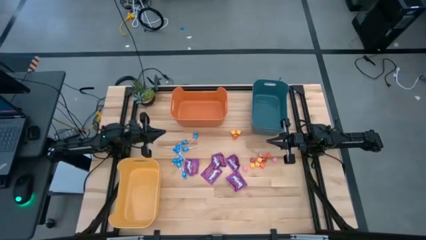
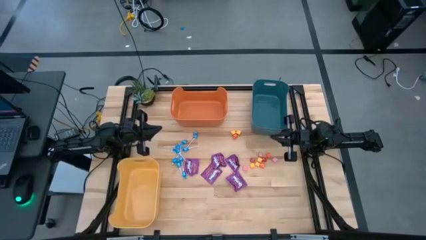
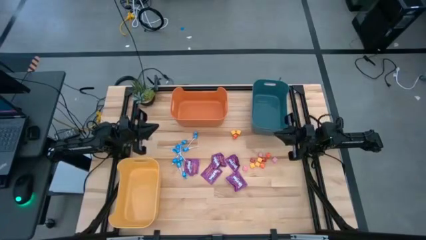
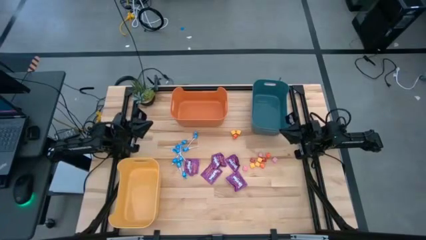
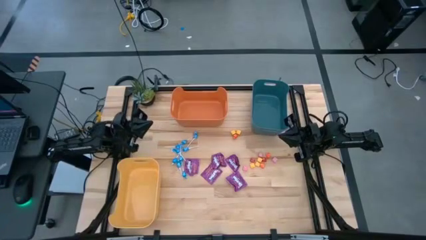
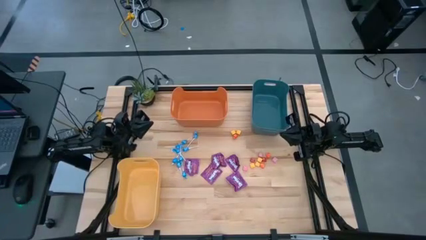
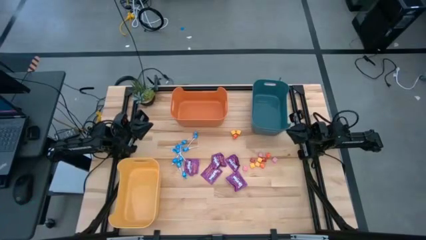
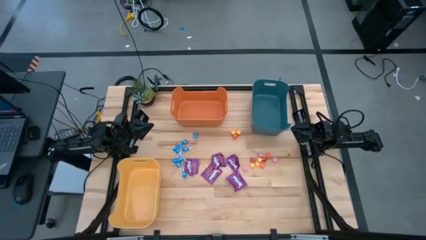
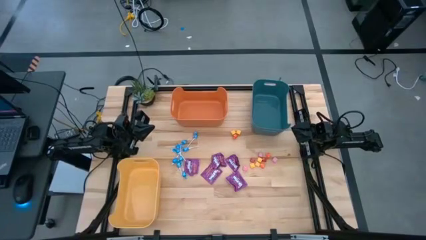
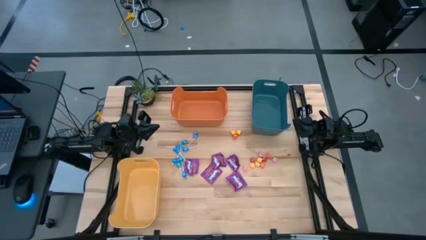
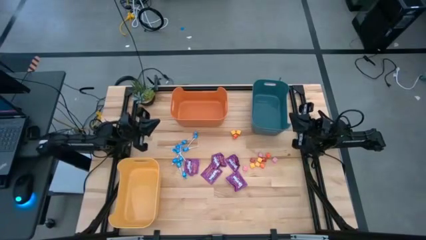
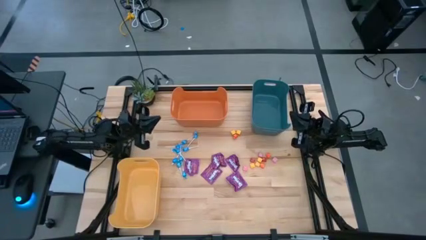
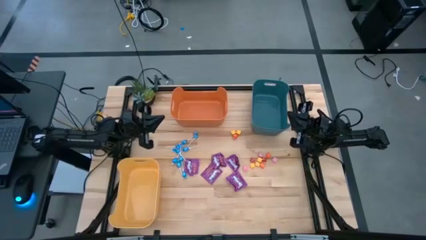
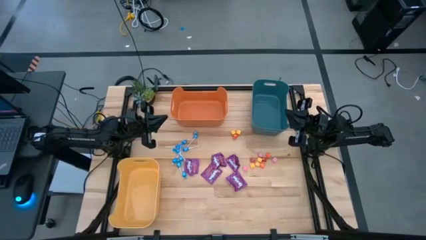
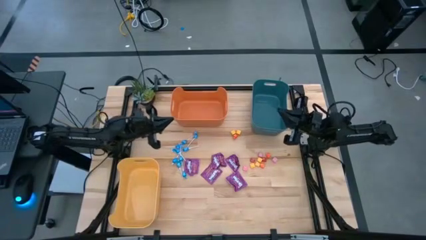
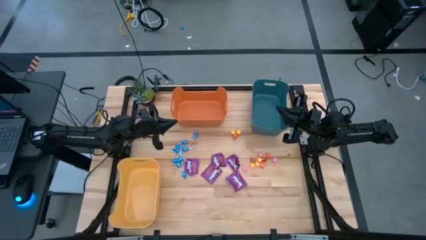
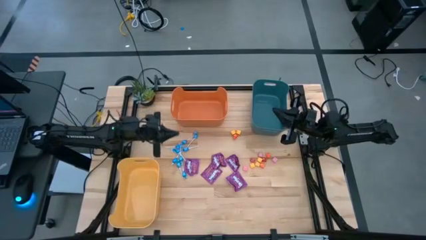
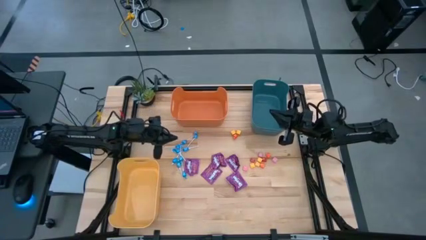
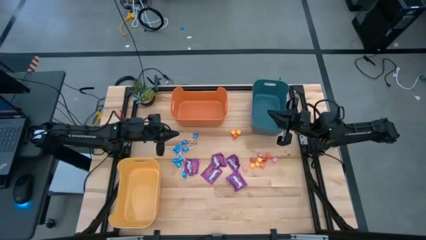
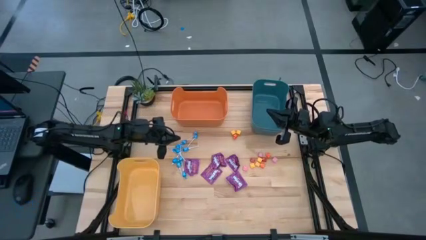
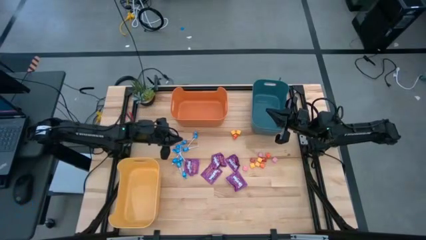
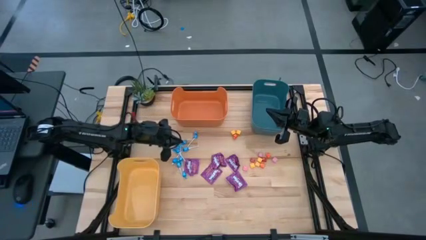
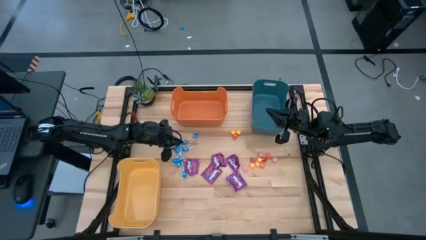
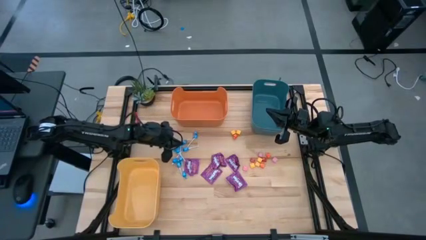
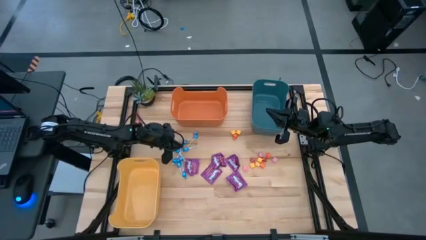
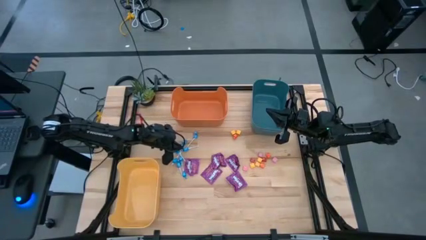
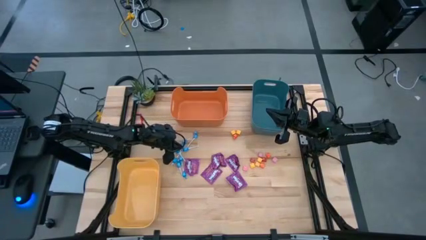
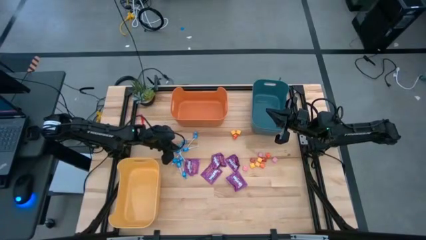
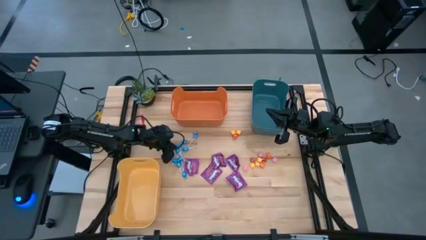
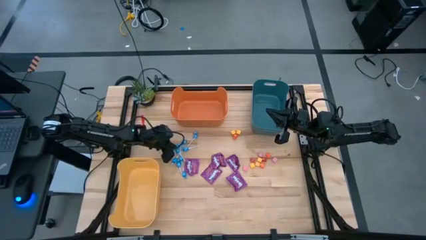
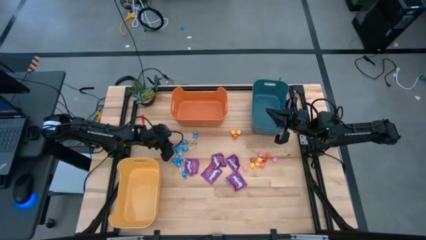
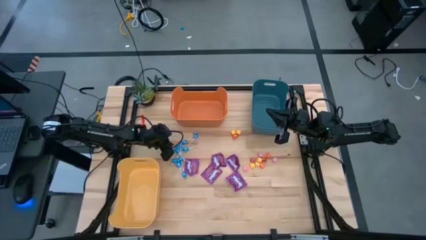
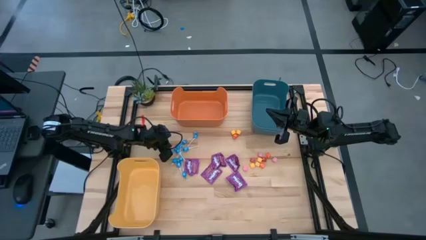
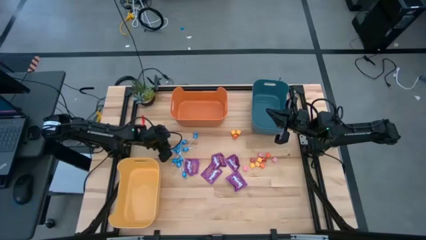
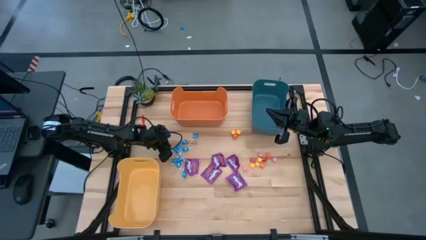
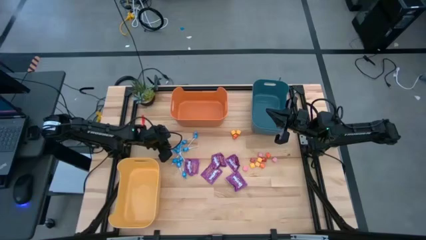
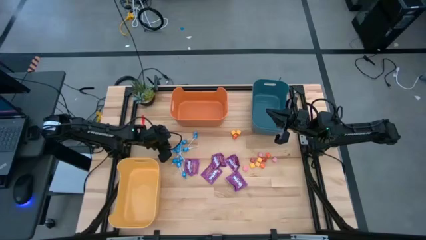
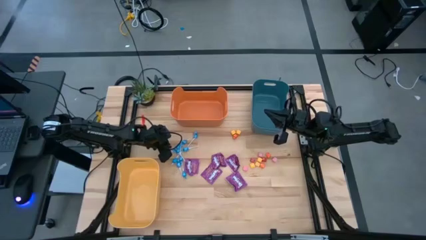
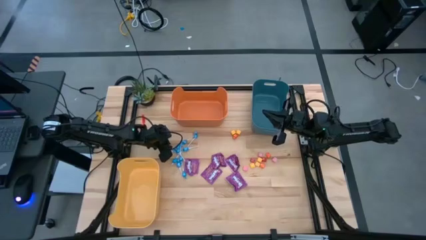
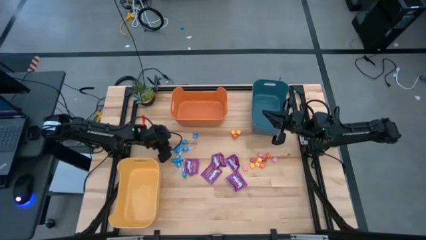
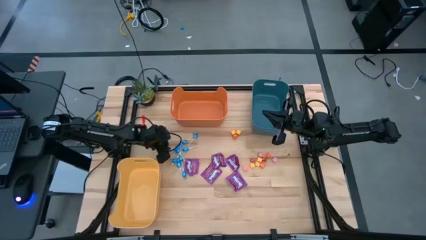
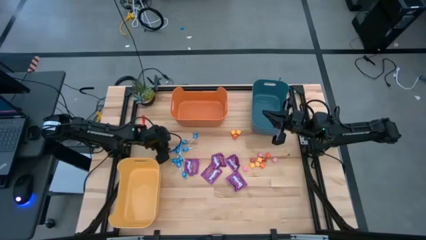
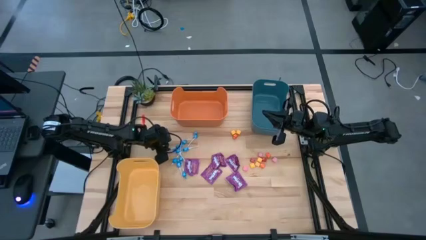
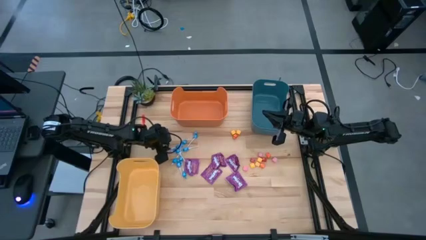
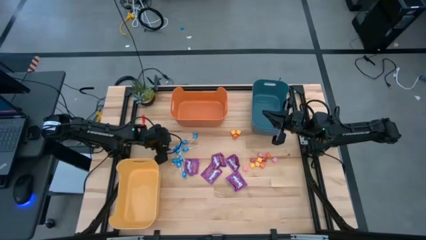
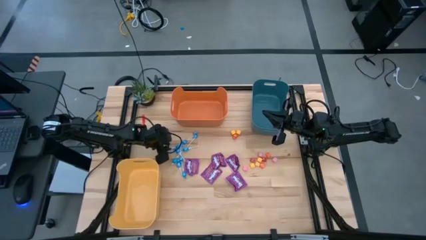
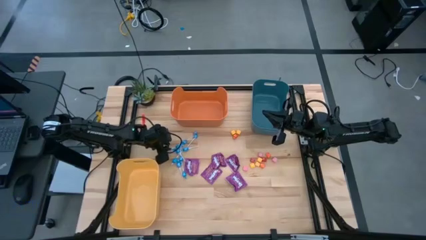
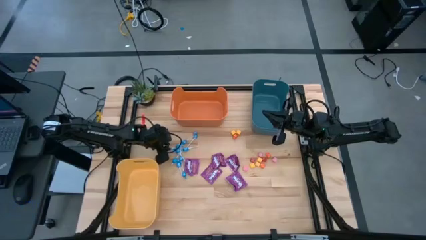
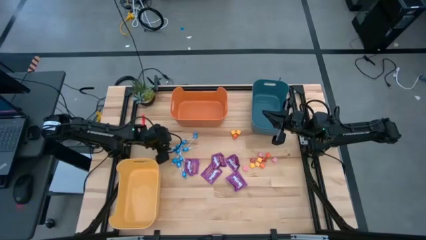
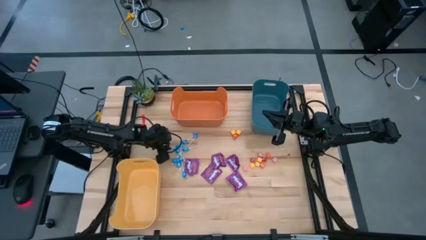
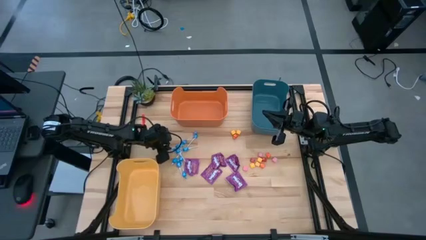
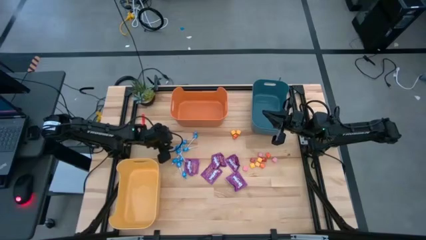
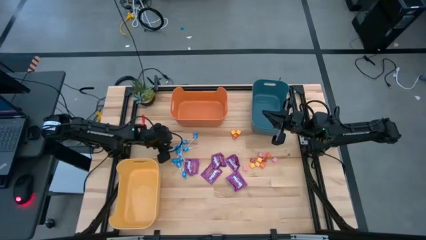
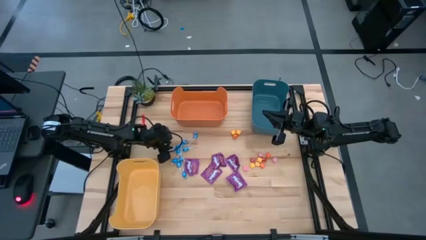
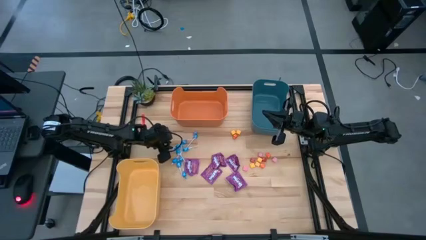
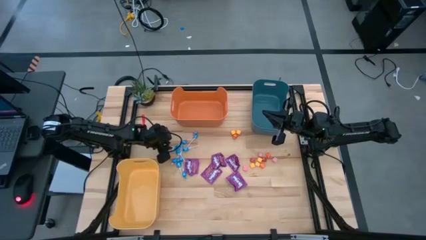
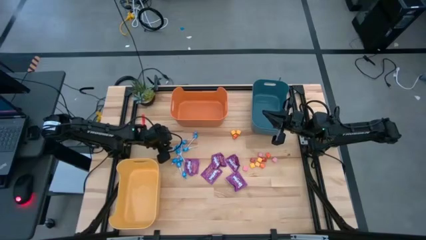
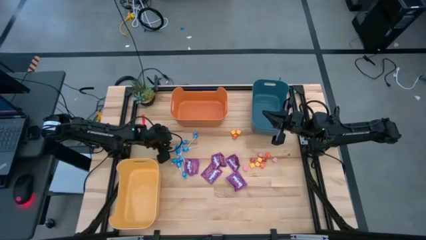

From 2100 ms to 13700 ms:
Task: Sort candy
Put the blue candy into the orange bin
